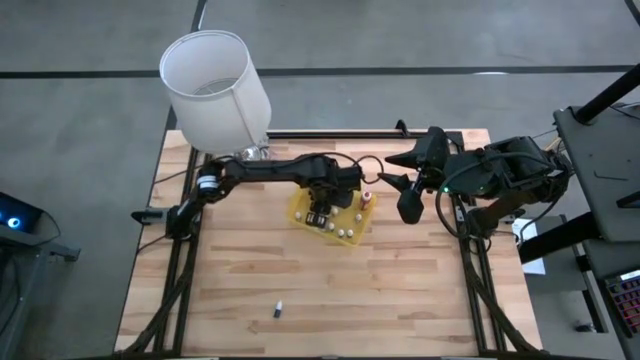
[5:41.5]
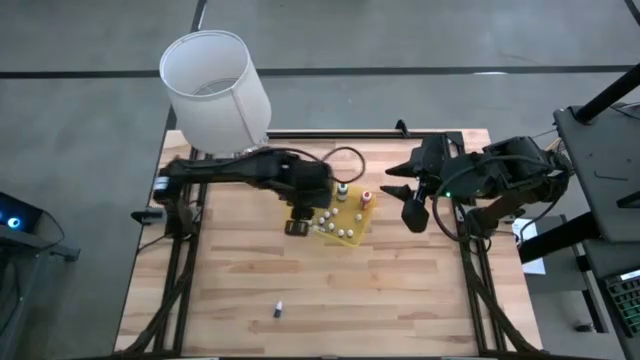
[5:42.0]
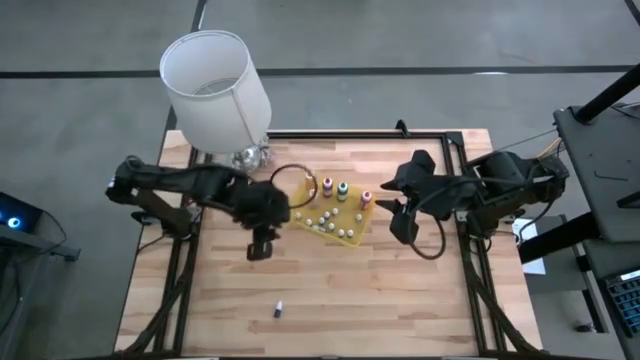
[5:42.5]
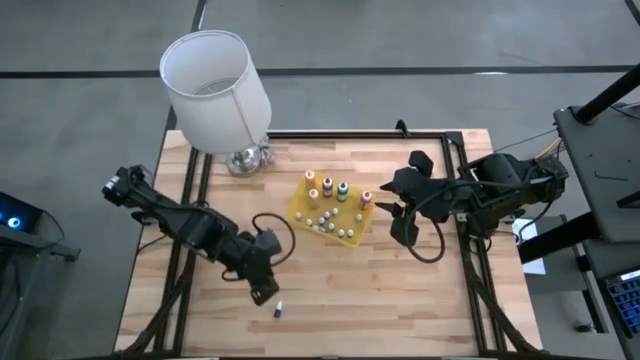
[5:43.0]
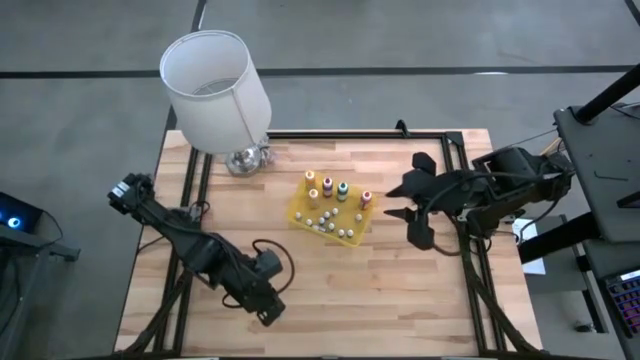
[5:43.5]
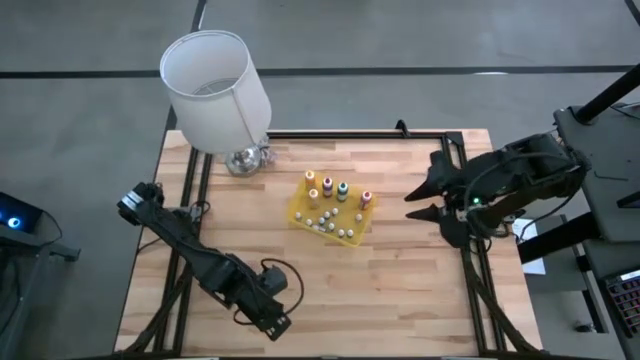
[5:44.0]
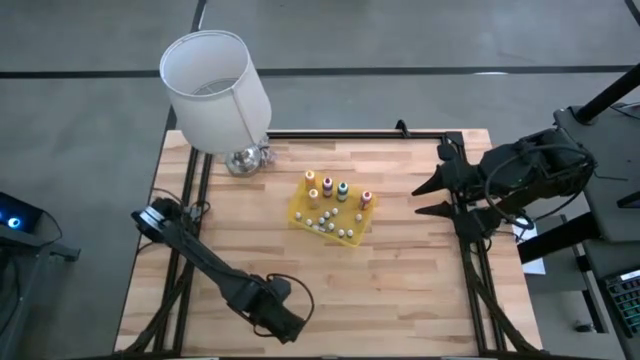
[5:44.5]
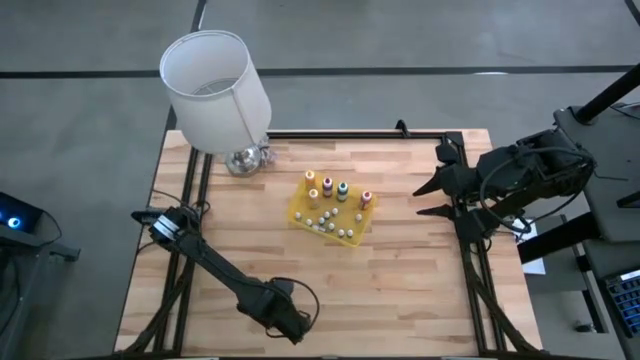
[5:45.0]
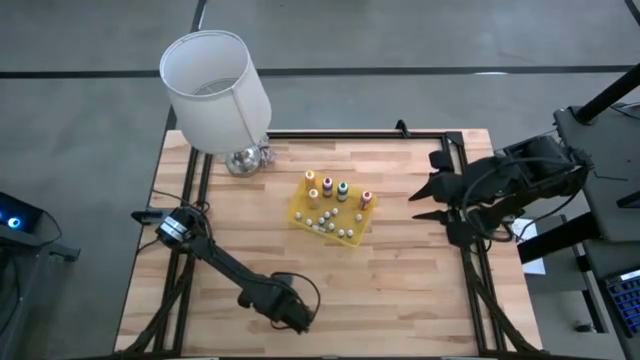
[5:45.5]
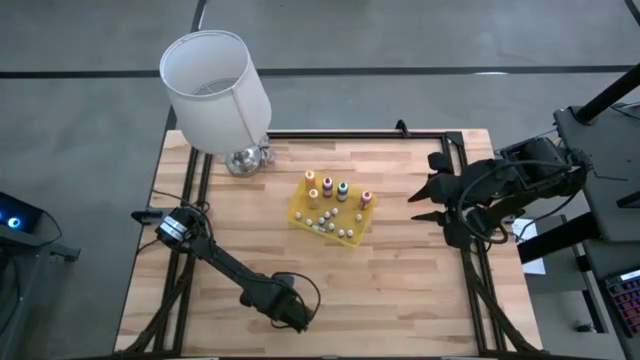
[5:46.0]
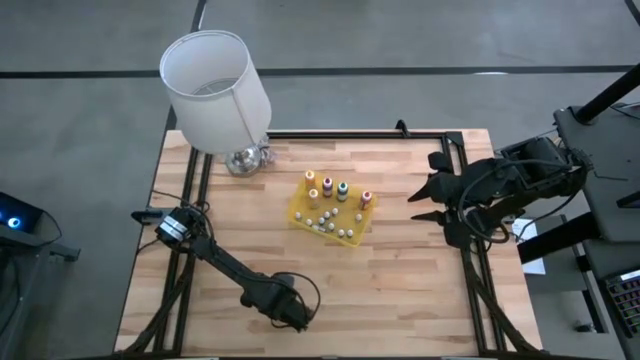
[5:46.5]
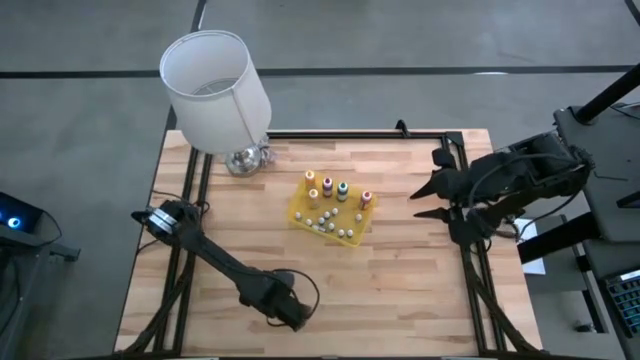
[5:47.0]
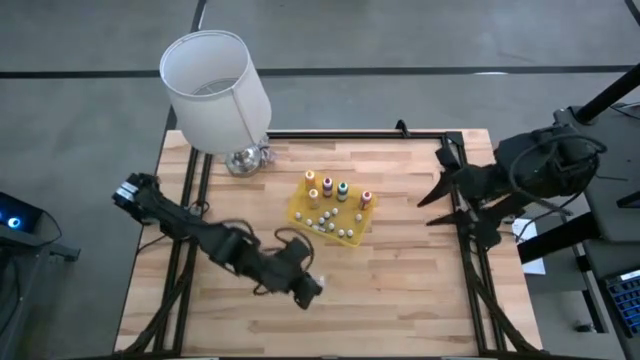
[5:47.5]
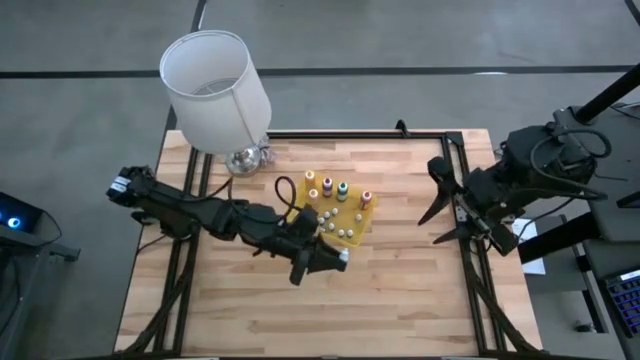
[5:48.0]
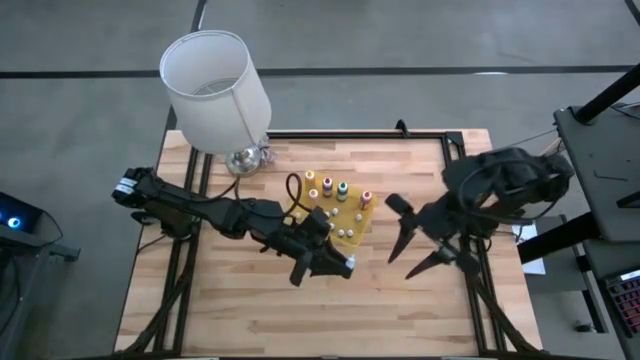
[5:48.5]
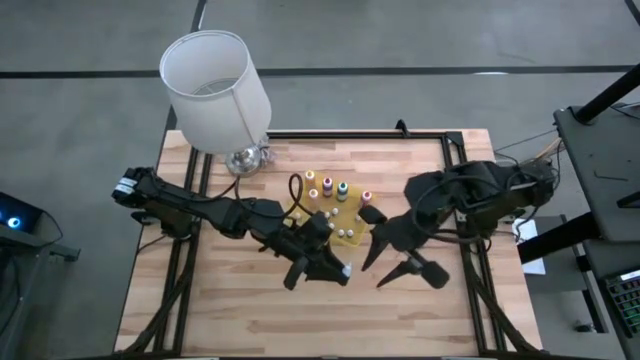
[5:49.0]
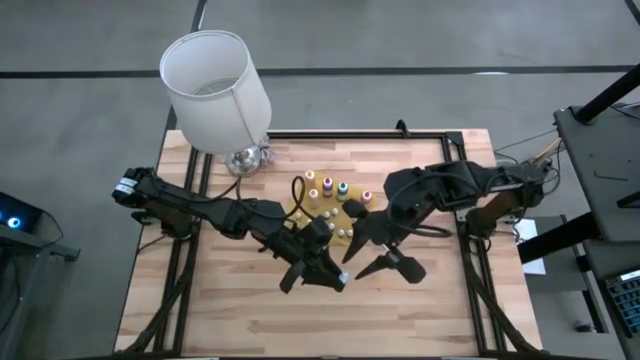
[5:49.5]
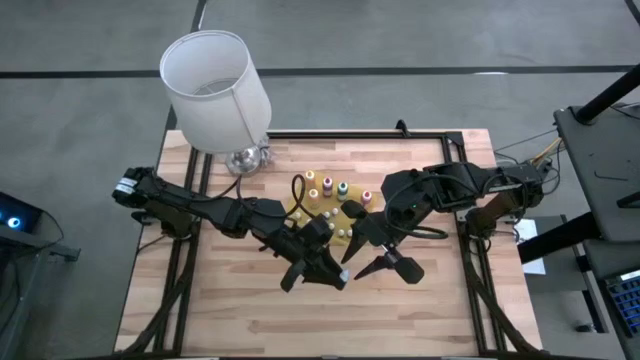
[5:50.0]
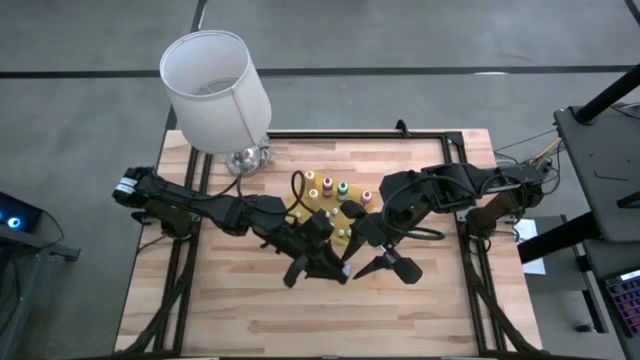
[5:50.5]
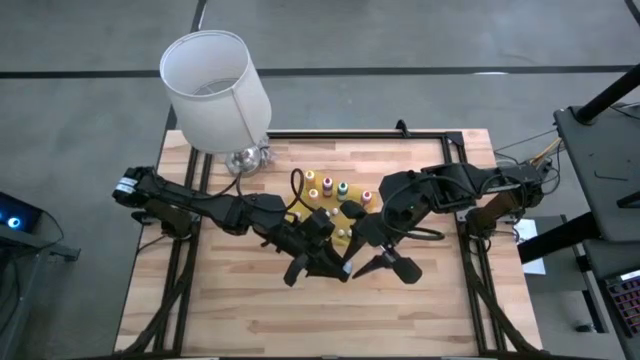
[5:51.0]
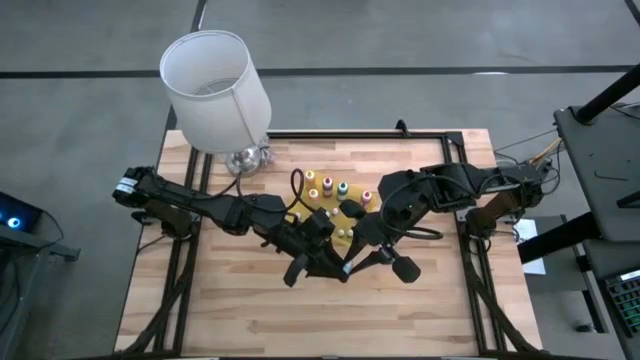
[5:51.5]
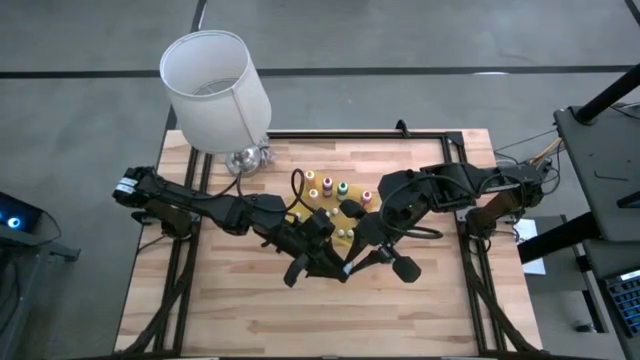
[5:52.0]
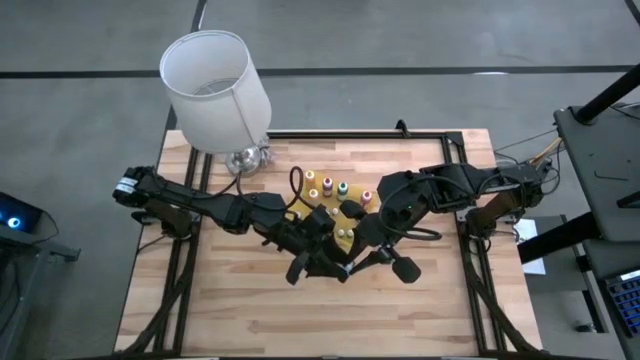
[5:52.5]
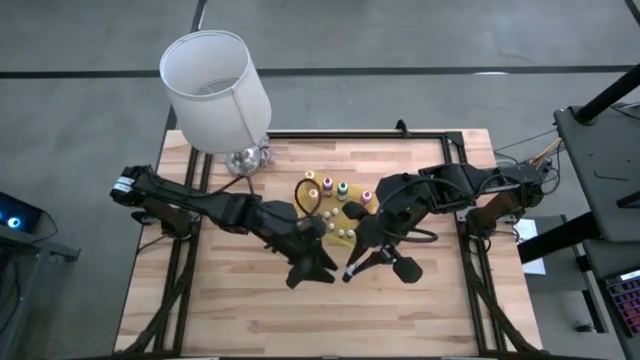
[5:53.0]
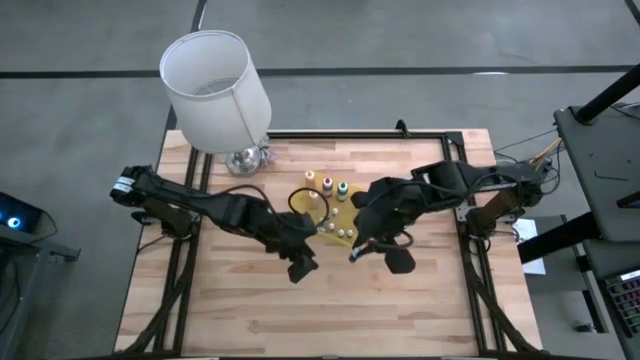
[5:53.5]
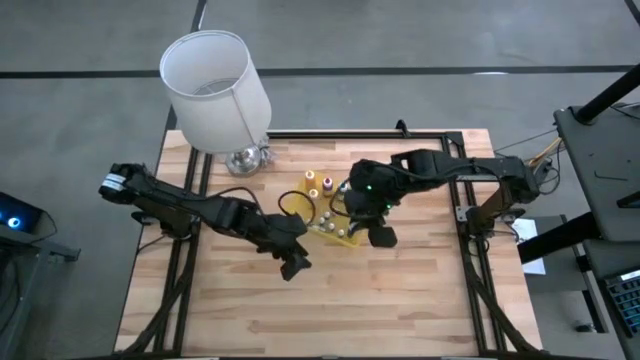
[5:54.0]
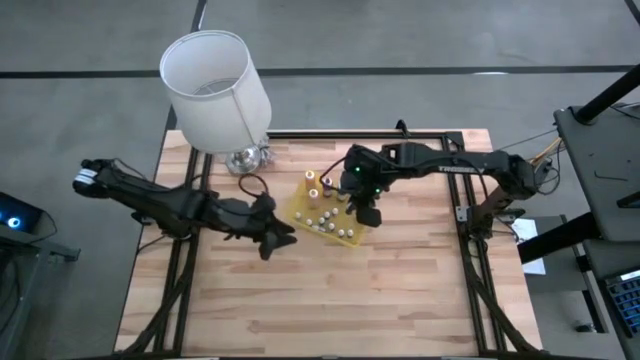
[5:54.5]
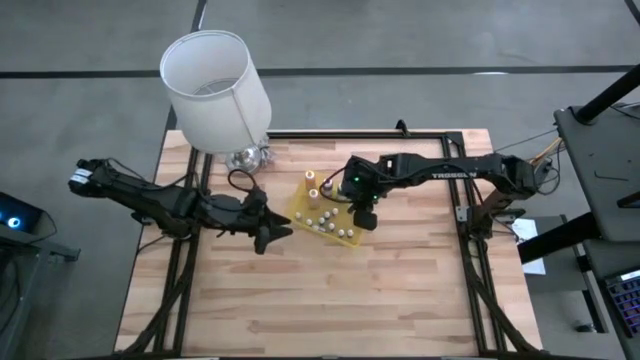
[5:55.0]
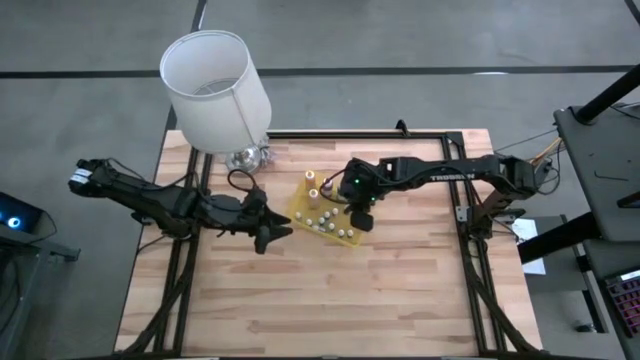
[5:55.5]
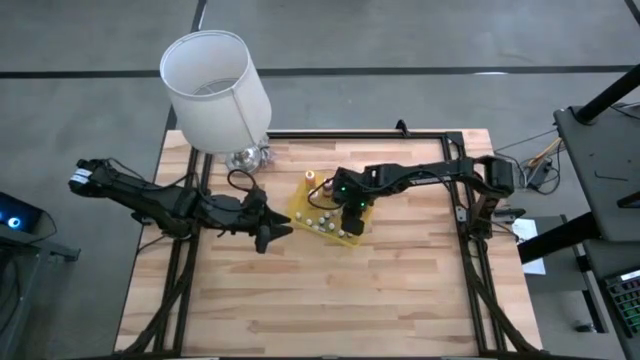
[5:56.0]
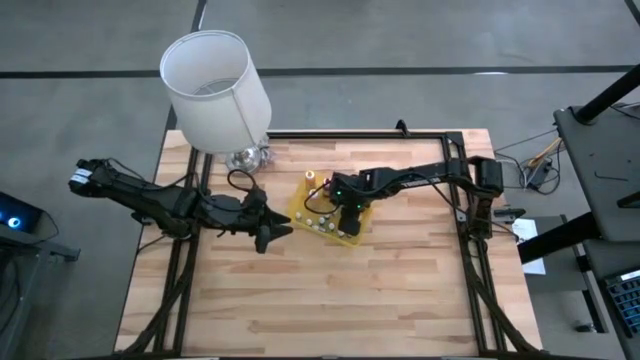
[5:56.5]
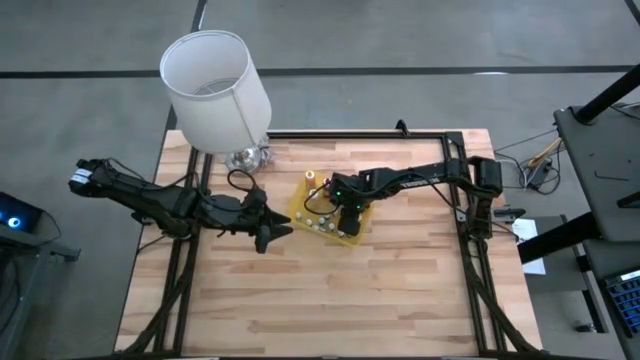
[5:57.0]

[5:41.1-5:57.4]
Task: Pick & Place food coloring
Put the small purple food coloring bottle into the yellow bin

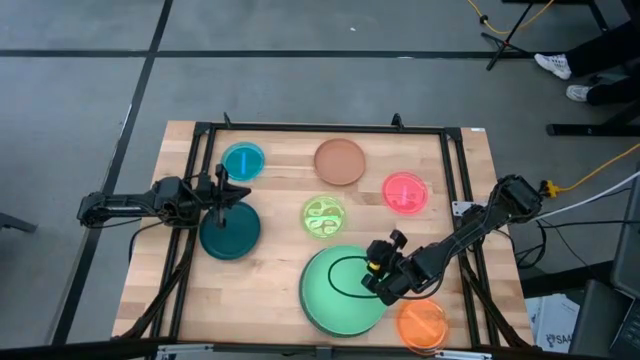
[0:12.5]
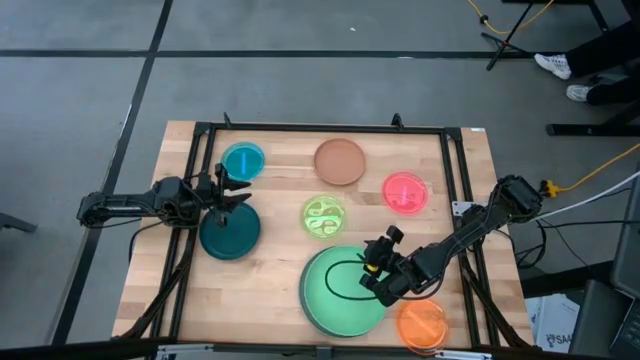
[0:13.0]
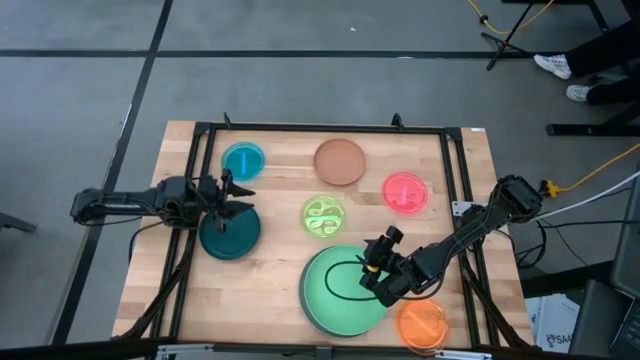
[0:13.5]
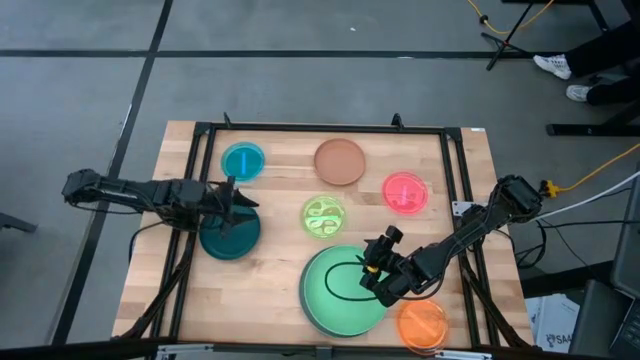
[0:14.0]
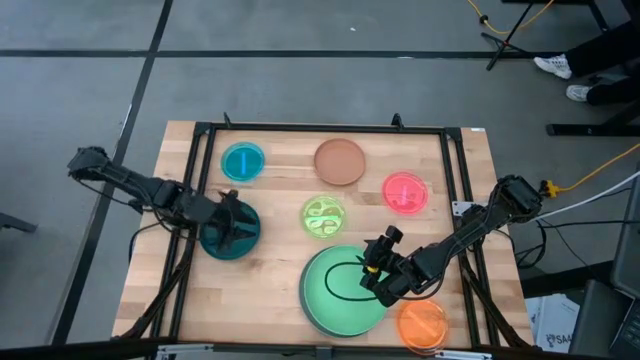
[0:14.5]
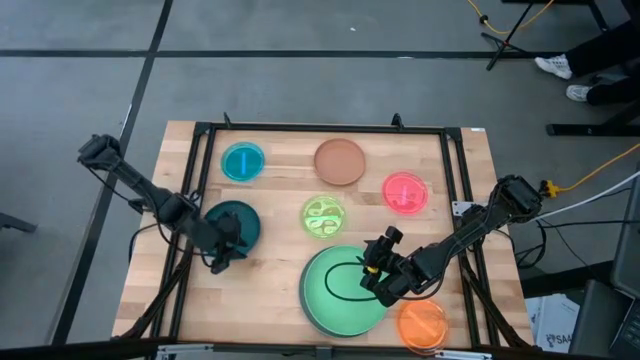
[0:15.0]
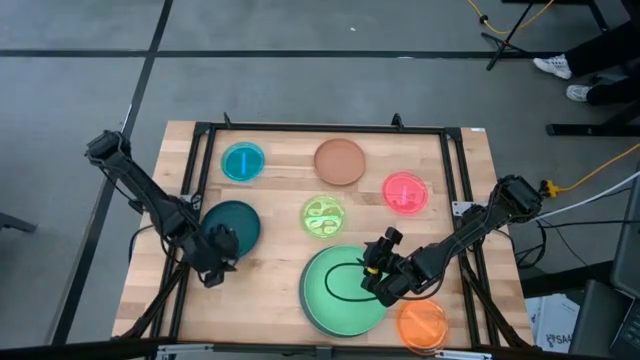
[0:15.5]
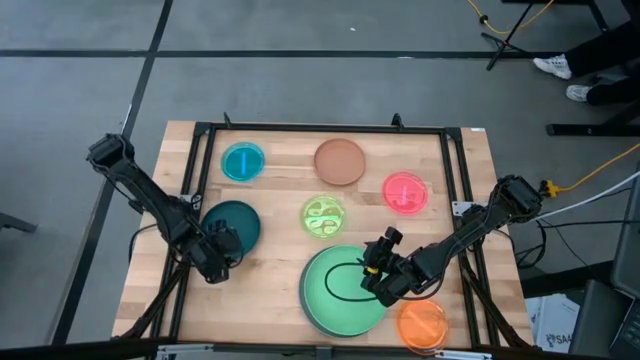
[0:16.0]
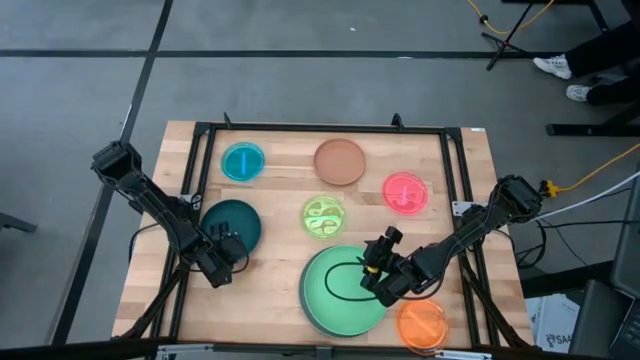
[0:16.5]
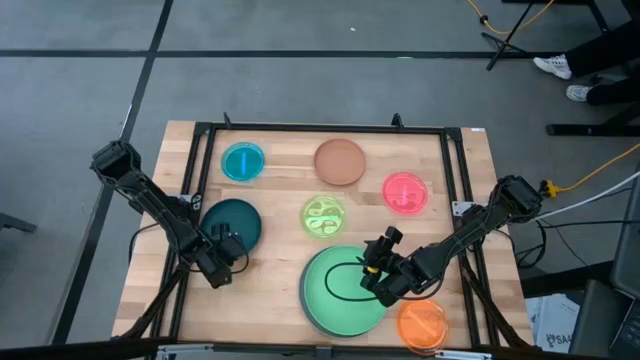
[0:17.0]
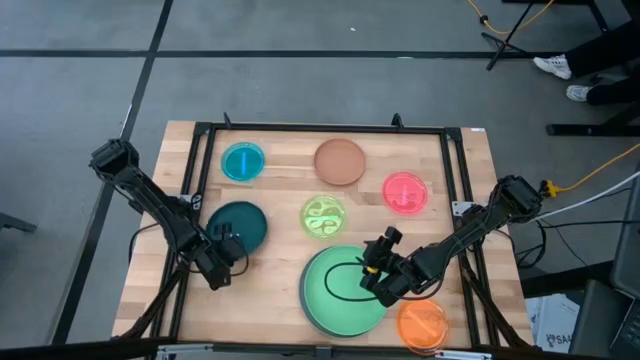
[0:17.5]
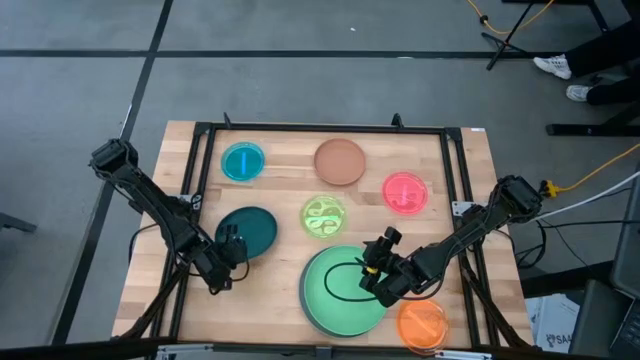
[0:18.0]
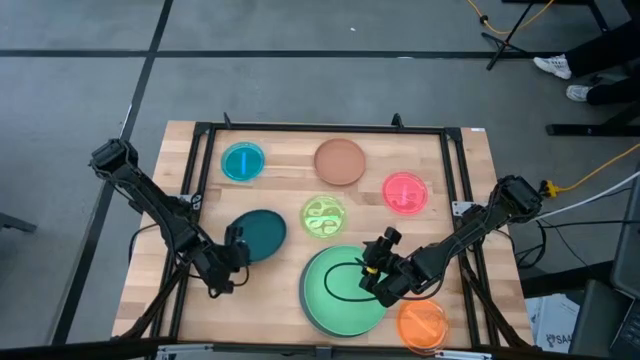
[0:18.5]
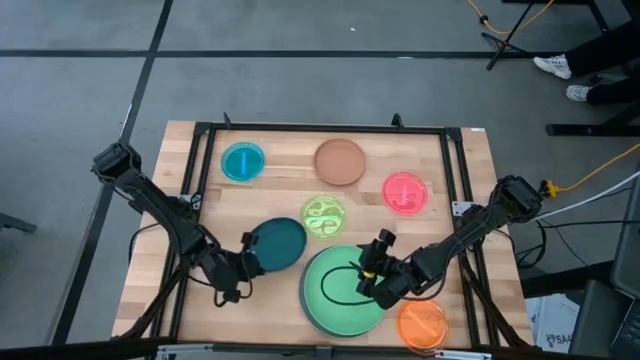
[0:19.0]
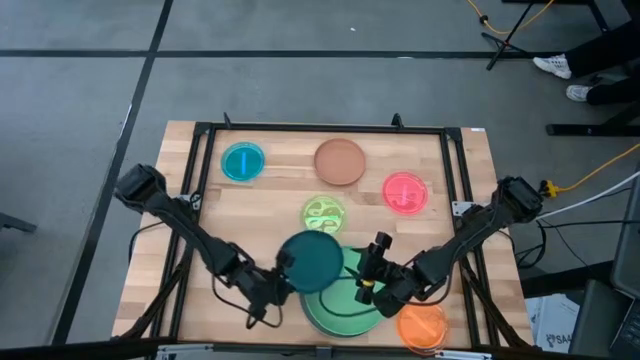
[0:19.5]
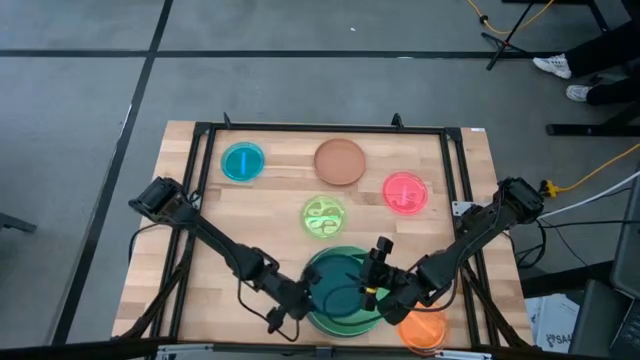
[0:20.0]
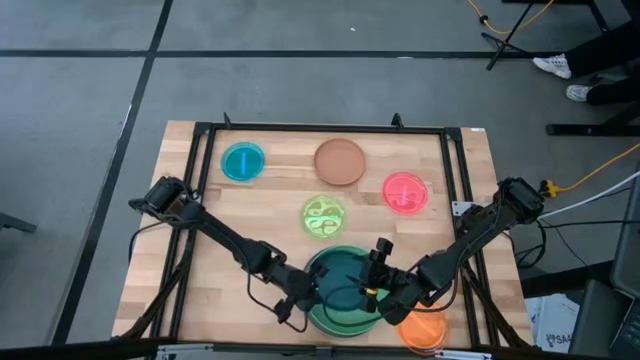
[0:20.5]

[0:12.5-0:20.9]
Task: Stack plastic plates
Stack the dark green plate on top of the light green plate
